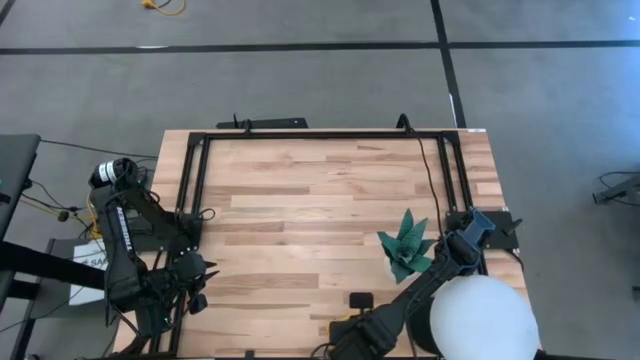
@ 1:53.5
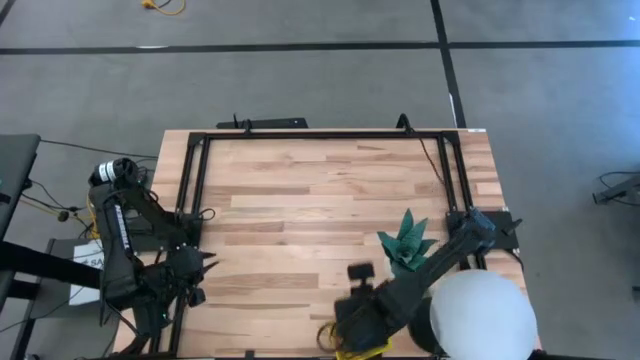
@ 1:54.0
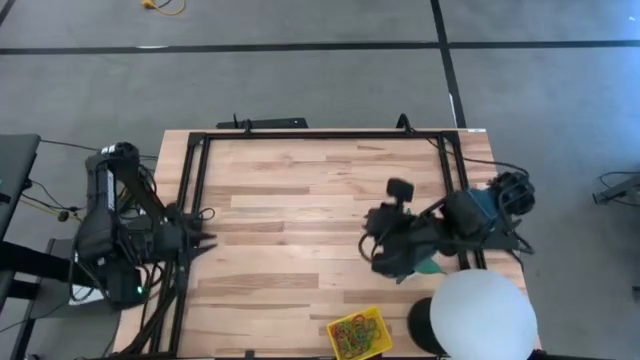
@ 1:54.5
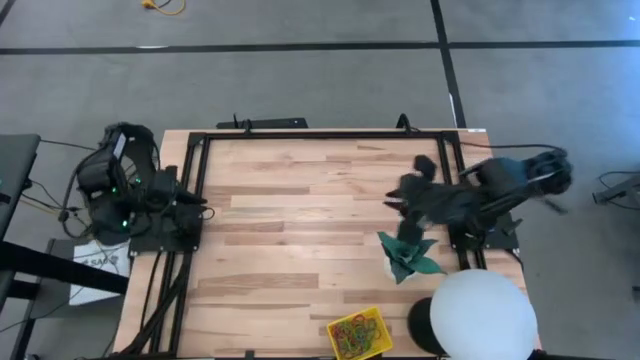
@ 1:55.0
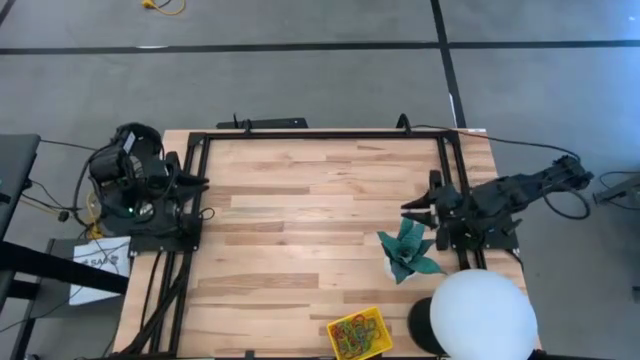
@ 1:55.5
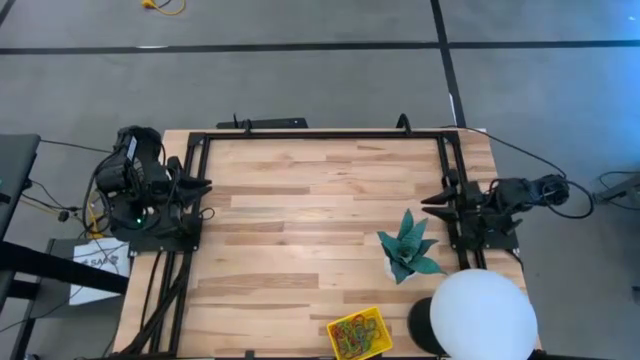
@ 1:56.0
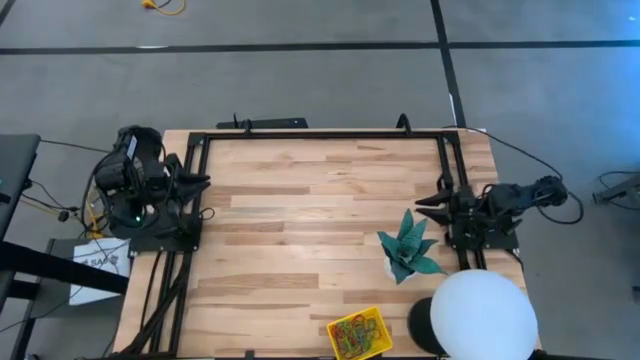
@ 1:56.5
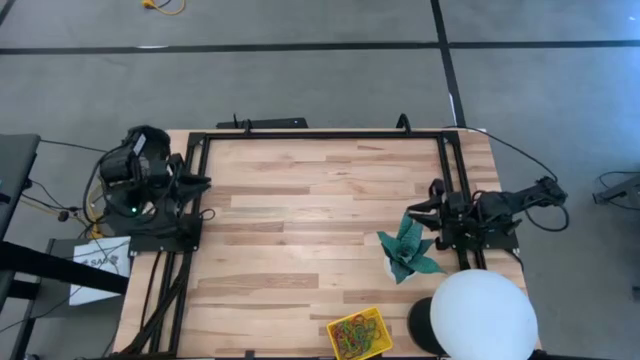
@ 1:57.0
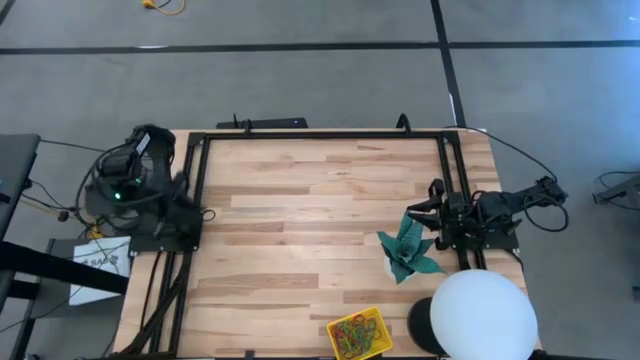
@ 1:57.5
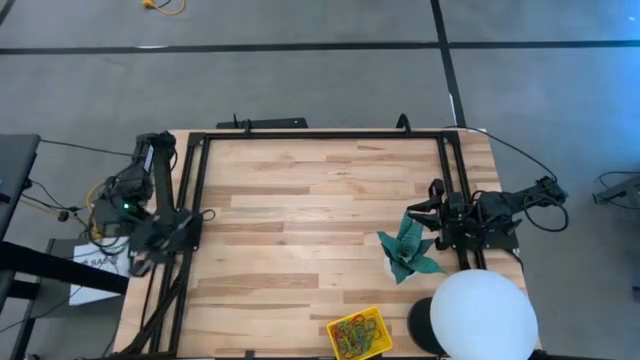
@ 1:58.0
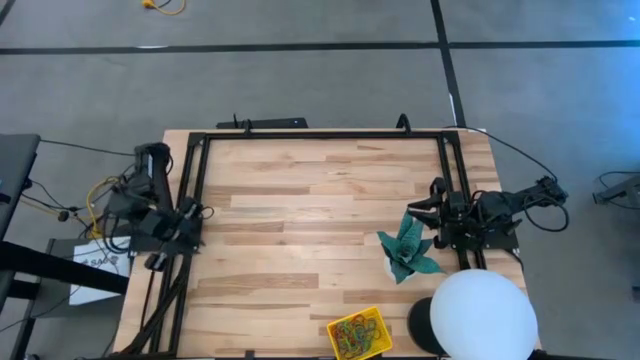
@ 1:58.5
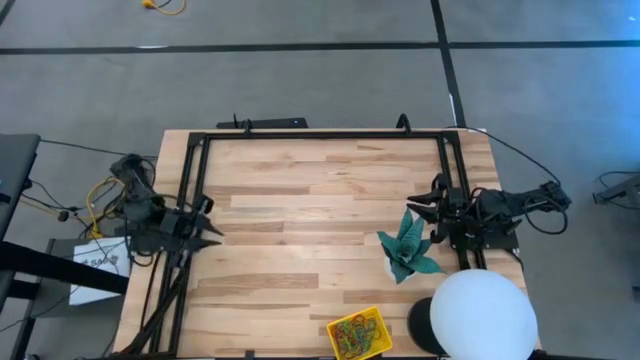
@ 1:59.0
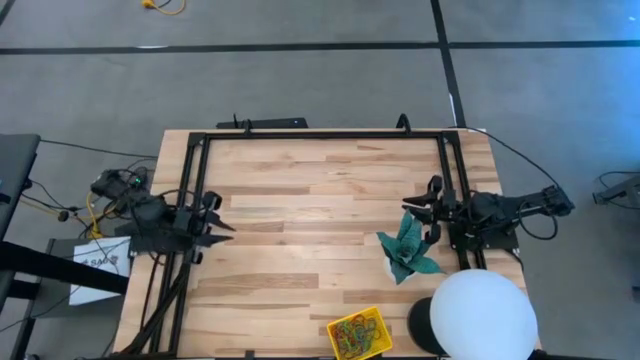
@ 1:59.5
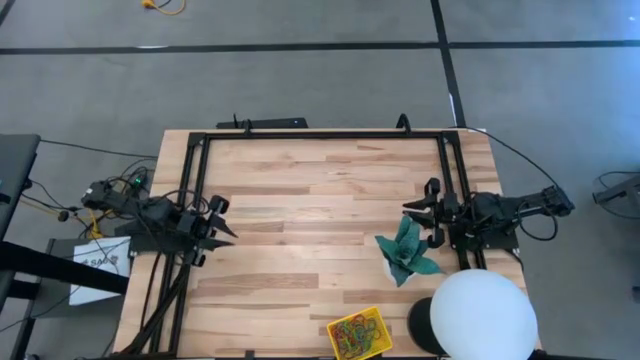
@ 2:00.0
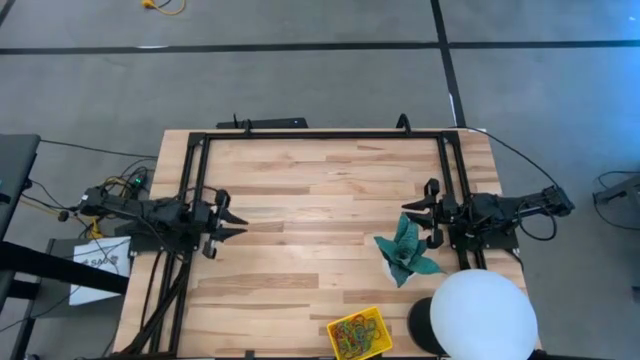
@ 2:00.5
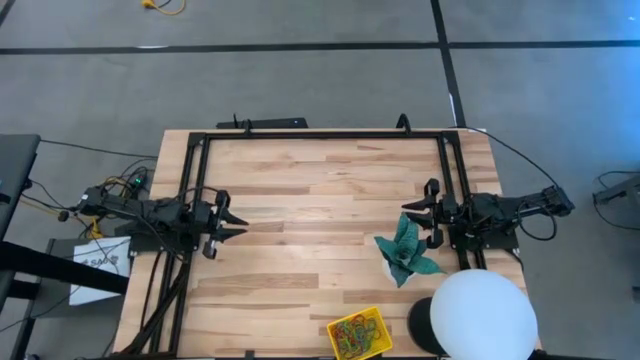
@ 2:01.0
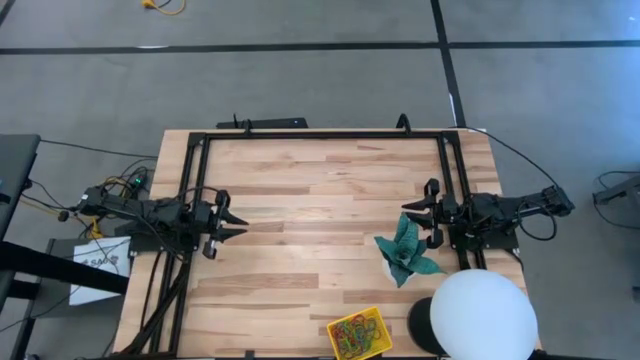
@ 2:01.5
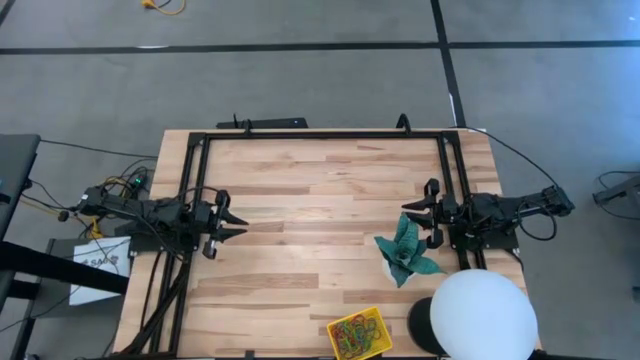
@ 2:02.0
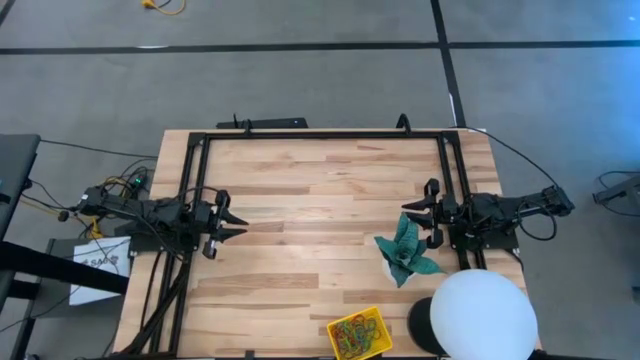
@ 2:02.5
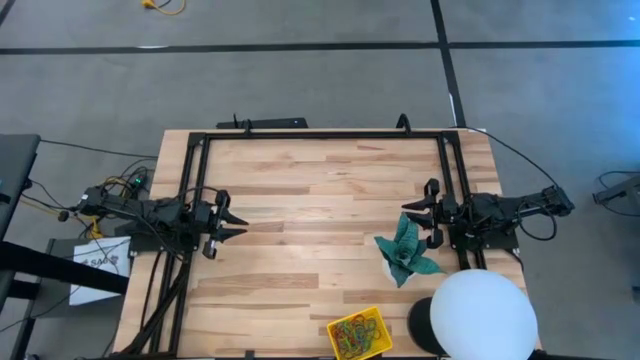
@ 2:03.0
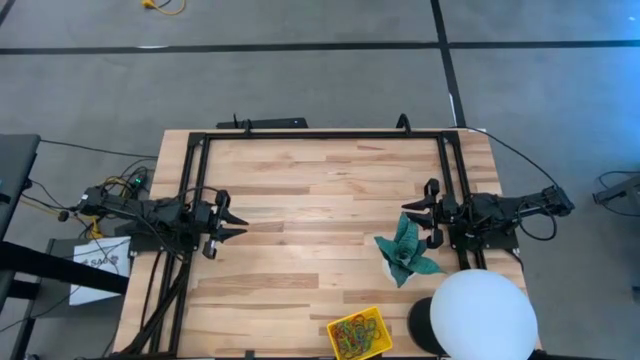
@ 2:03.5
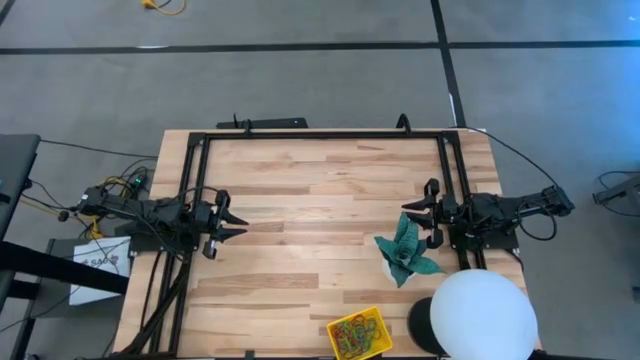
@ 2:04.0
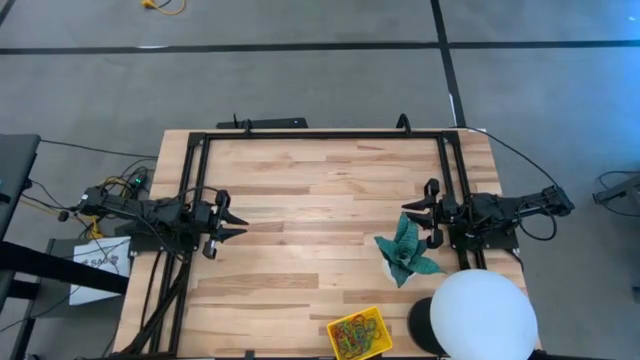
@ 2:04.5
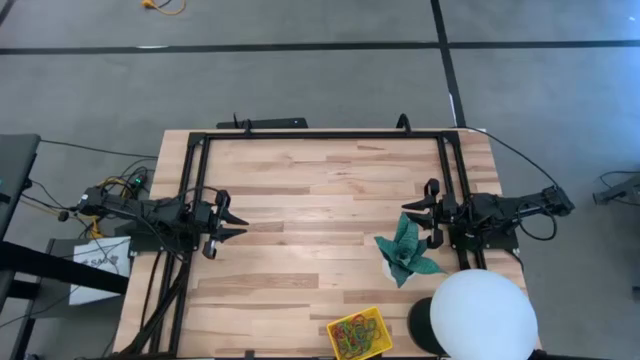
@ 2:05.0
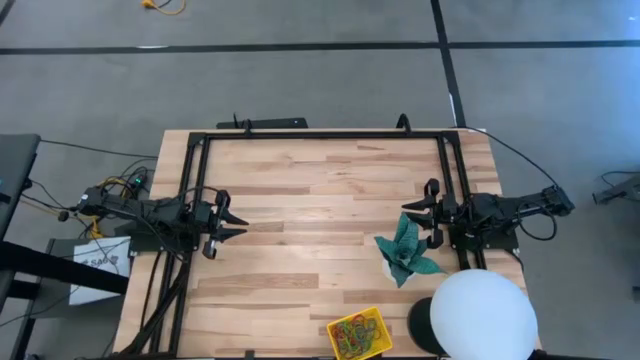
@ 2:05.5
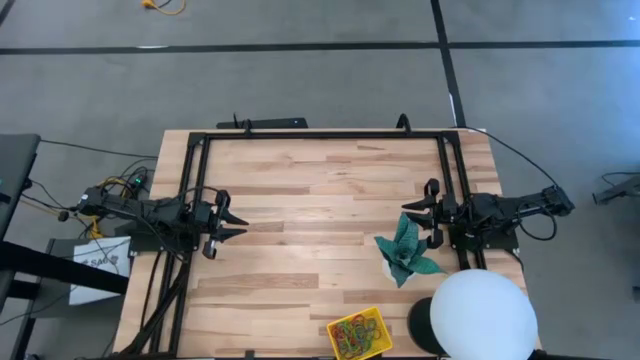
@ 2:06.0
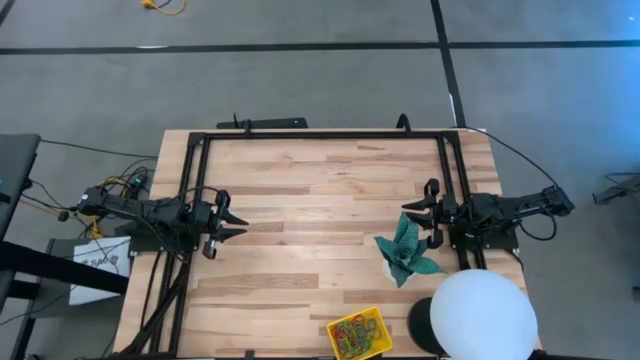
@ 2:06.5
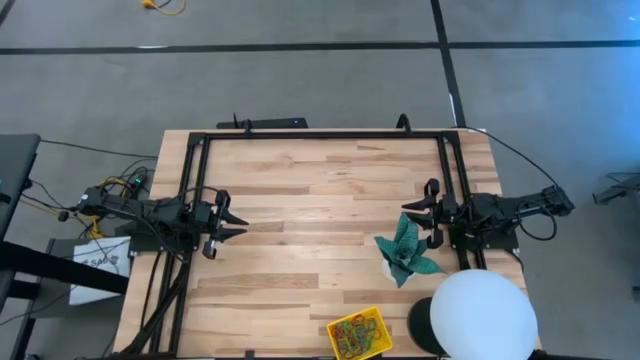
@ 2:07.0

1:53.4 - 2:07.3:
Task: Pick and place items into bin
Return to Home Position

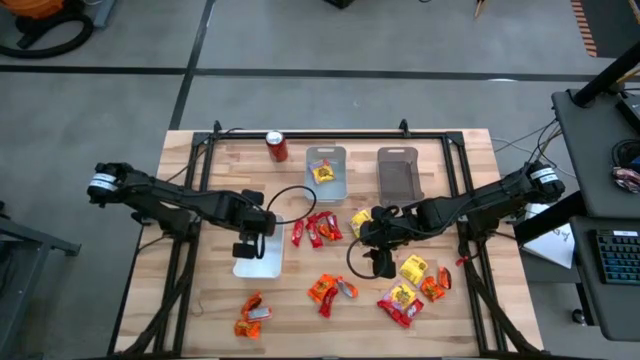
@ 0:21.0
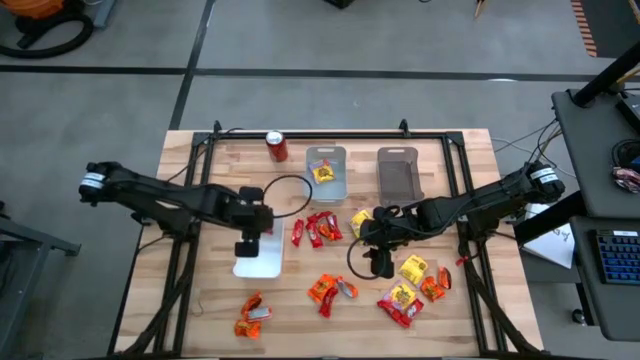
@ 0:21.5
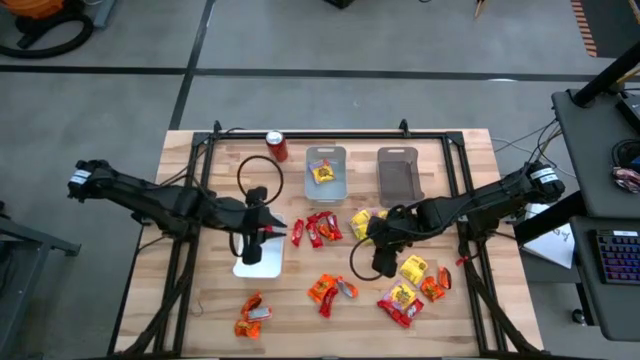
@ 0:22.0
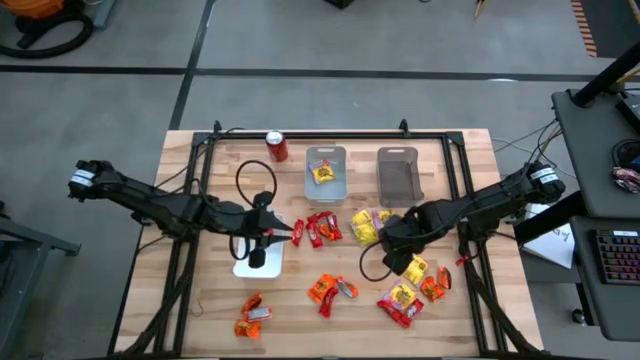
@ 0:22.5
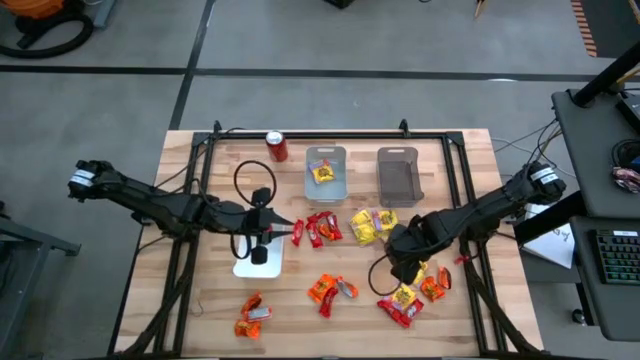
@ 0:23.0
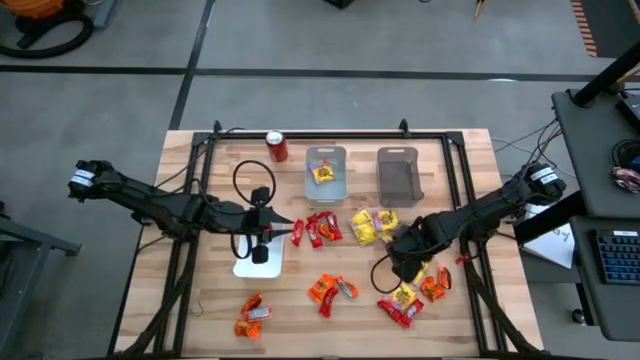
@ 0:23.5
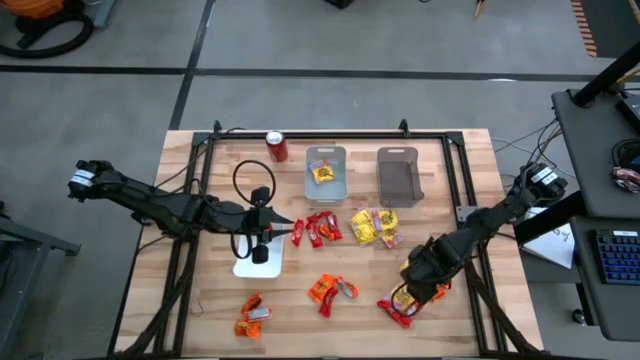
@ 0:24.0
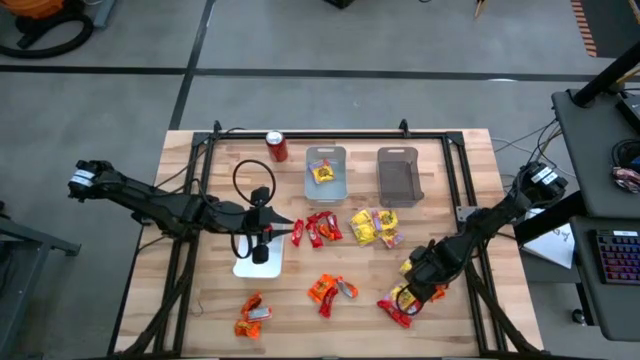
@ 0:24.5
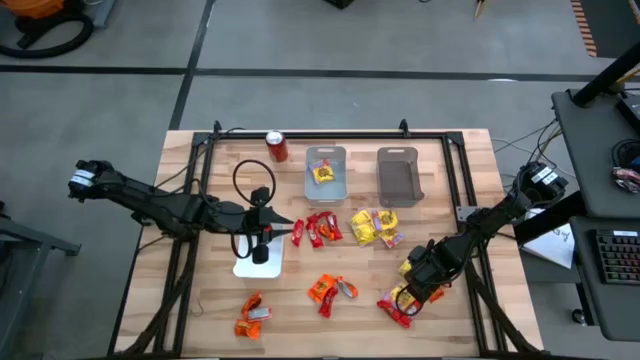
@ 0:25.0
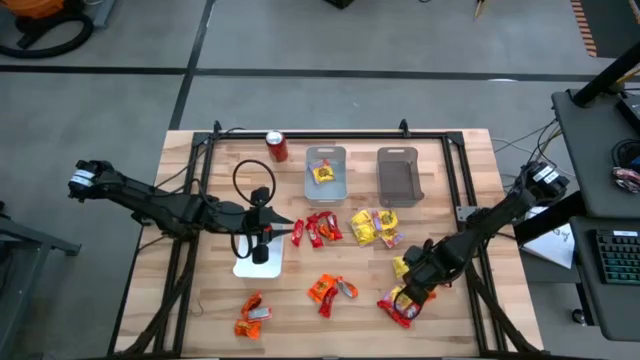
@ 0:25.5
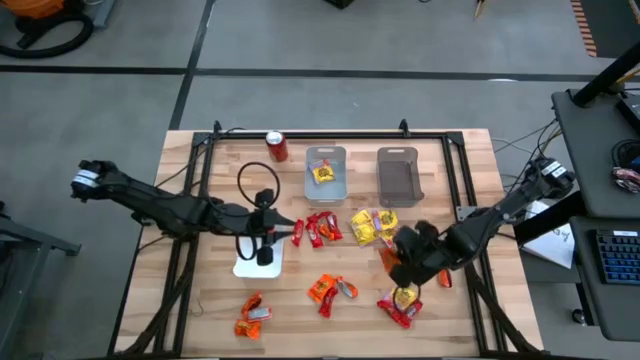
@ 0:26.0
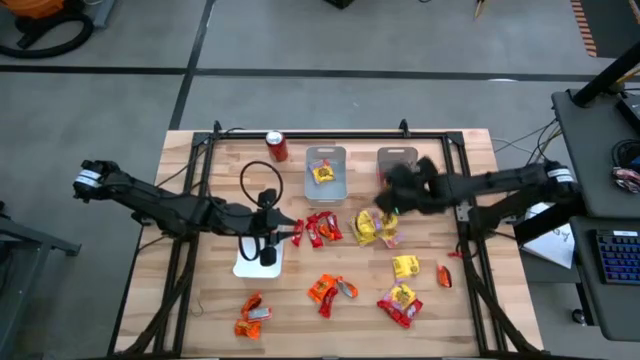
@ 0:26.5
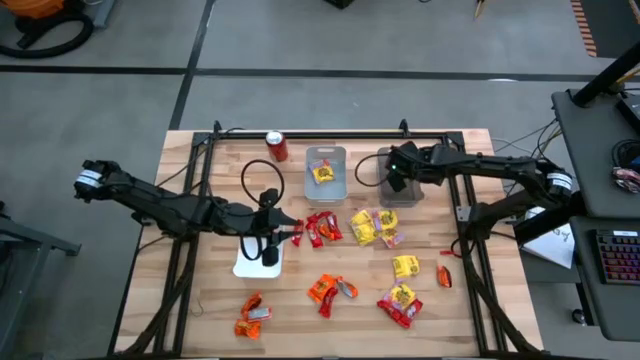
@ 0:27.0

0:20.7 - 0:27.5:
Task: Sort candy
Put the orange candy into the black bin
